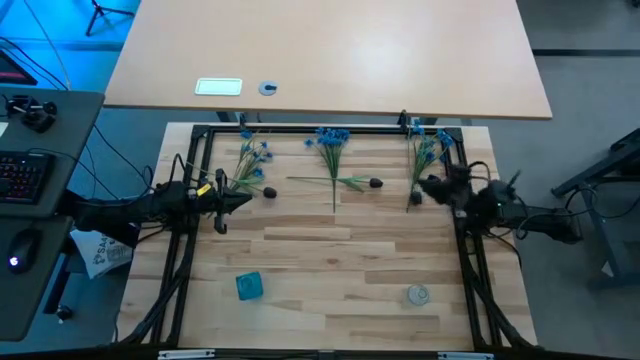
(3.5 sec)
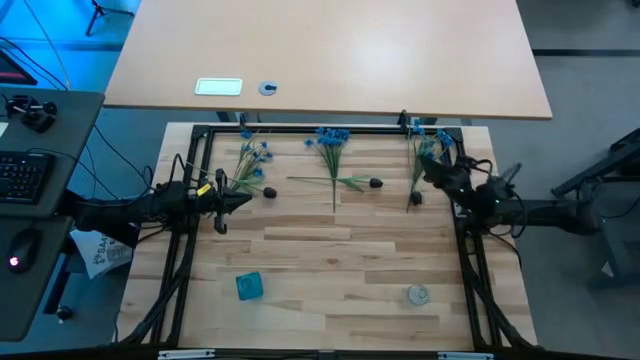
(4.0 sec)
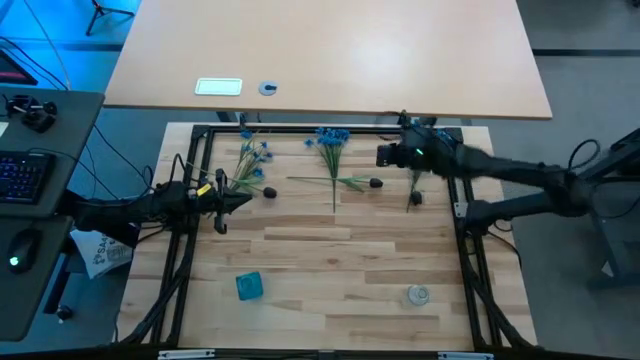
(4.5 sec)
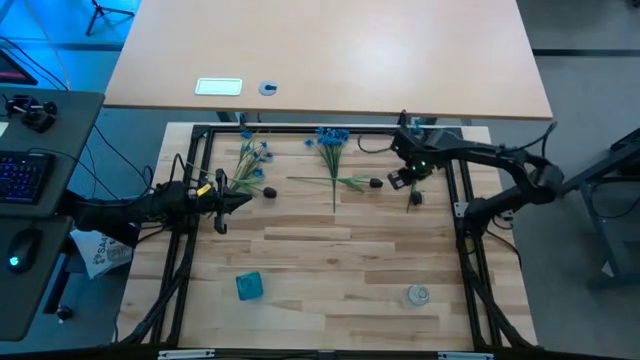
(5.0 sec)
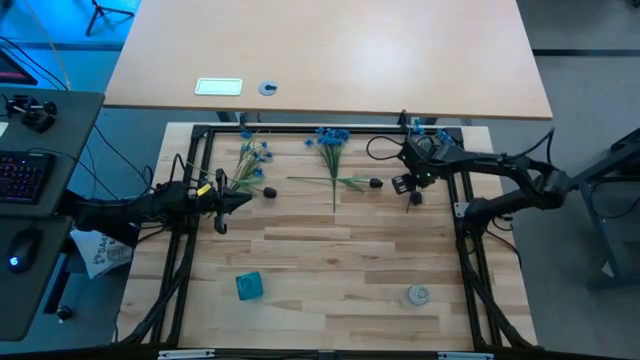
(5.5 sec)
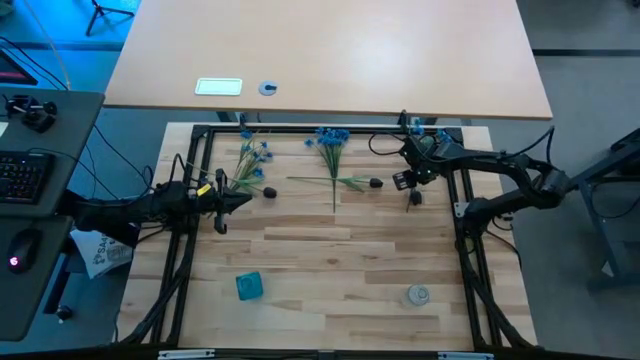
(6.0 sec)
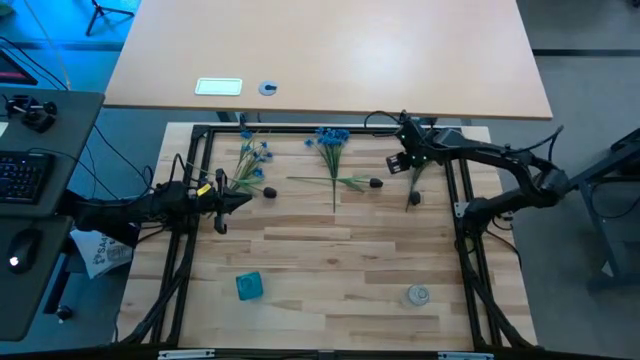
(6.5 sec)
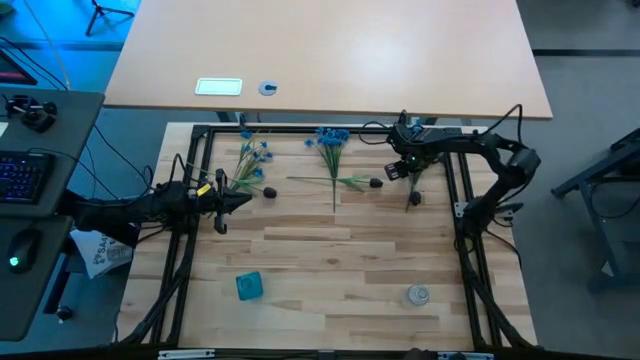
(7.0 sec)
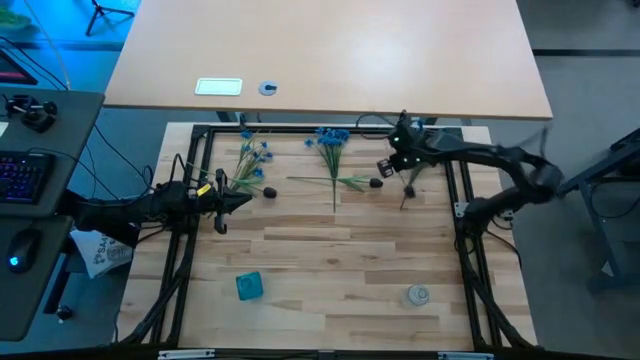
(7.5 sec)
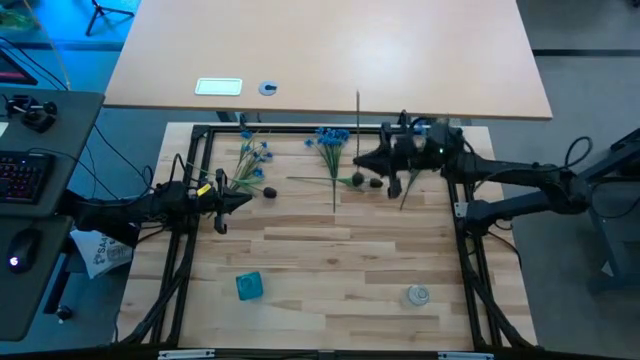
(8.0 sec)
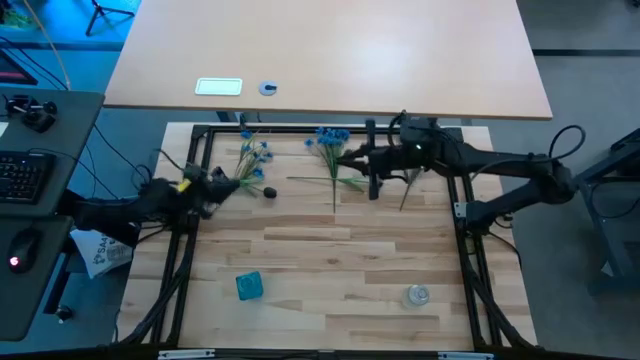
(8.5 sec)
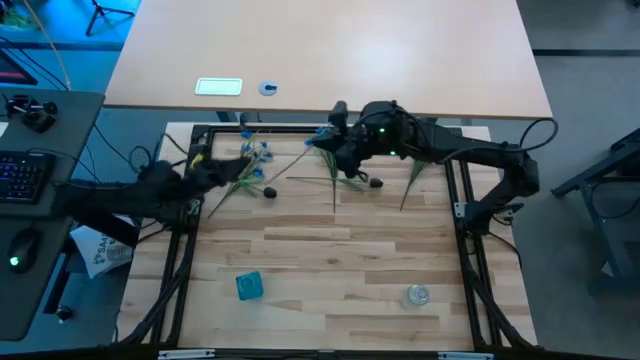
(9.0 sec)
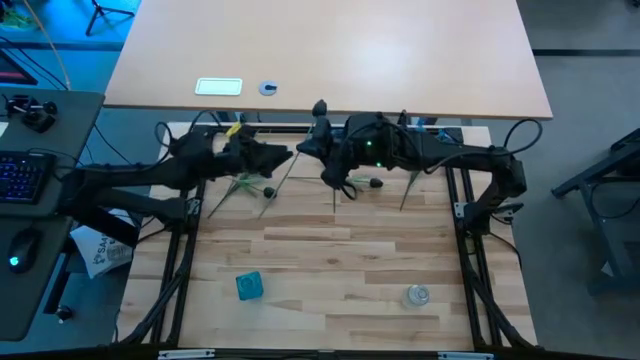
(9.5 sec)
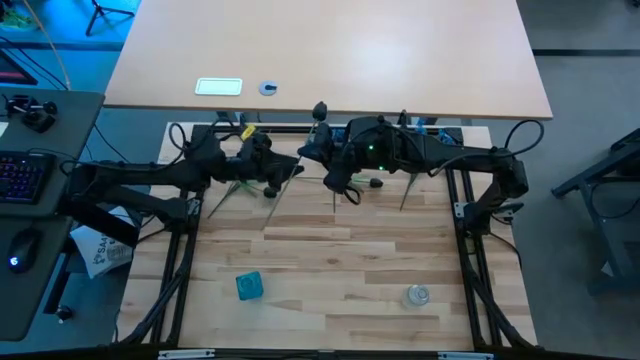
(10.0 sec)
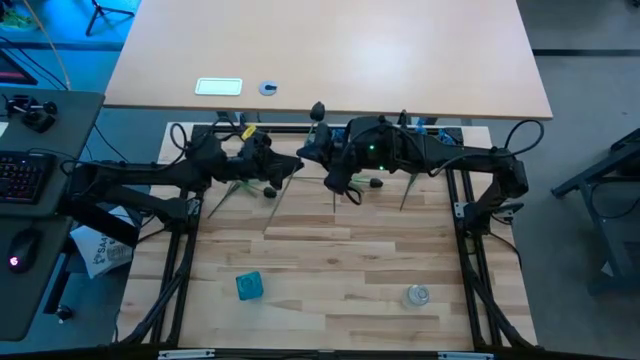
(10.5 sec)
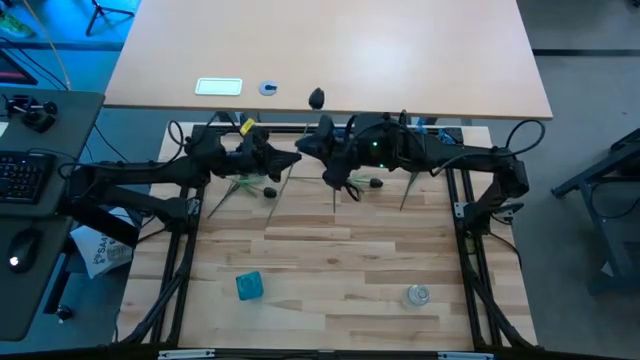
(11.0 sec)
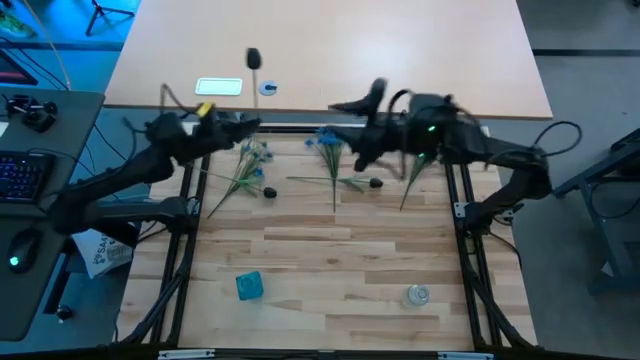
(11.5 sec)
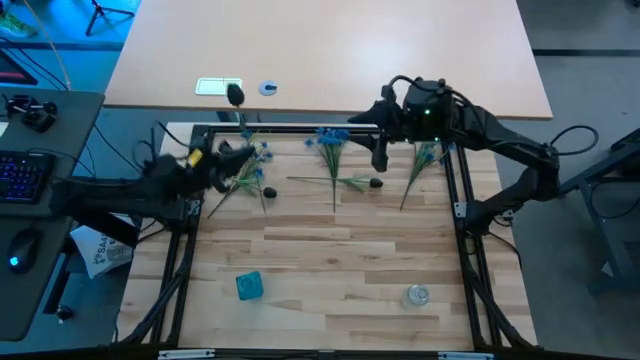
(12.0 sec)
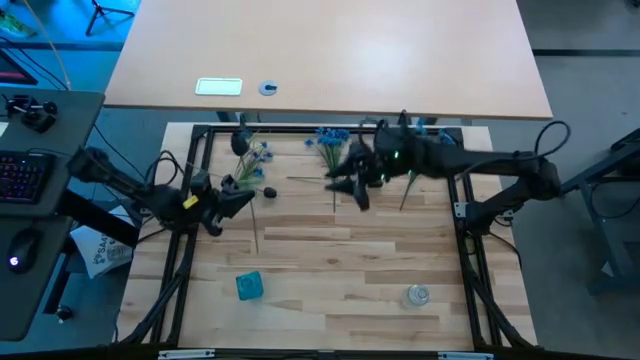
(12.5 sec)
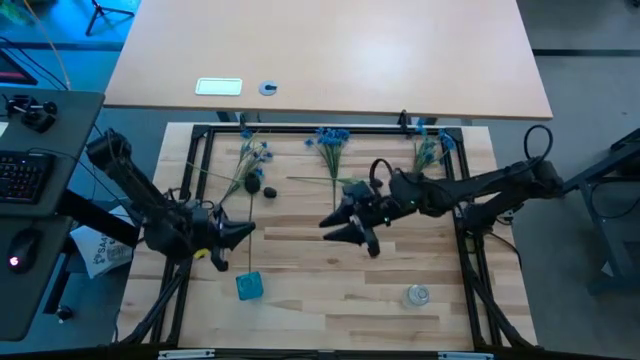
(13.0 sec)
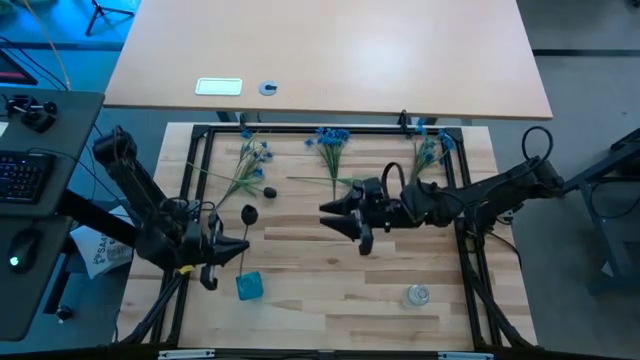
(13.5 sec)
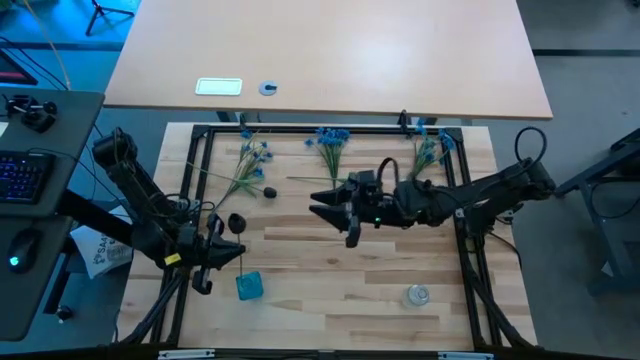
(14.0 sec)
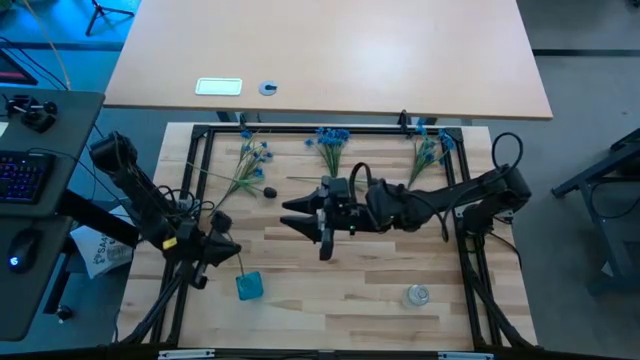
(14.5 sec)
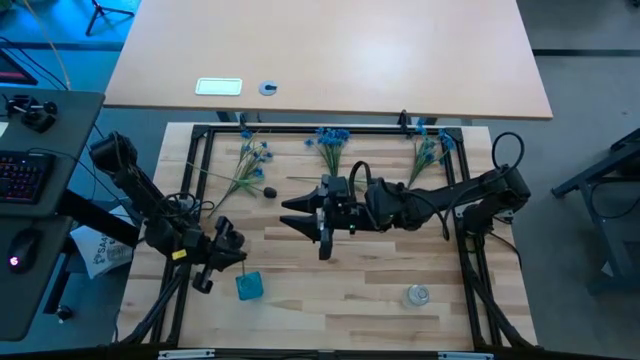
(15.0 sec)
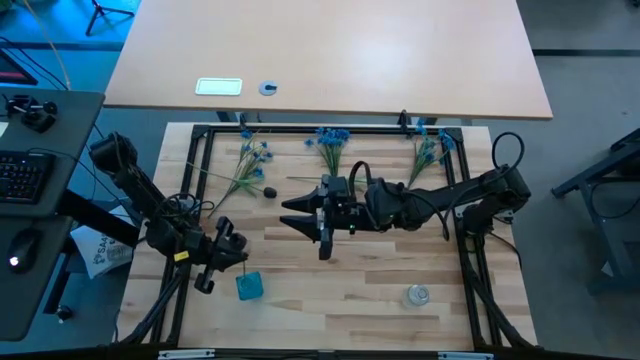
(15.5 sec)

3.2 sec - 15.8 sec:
Task: Sort flowers into vase by color
Put the right black flower into the blue vase

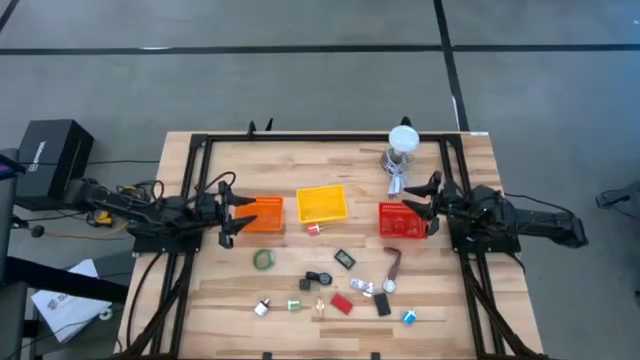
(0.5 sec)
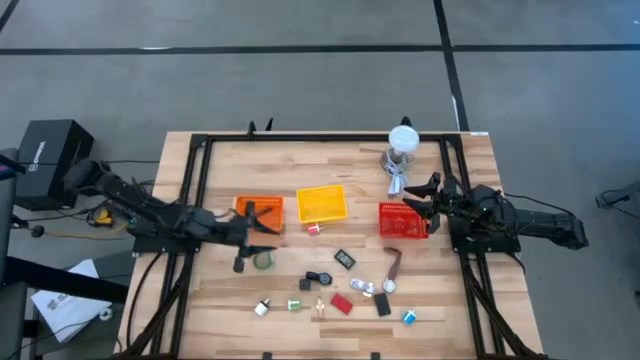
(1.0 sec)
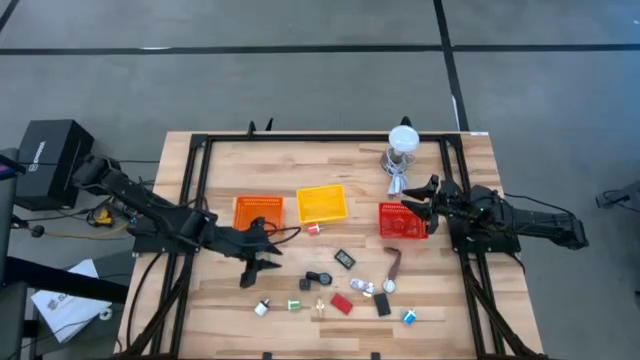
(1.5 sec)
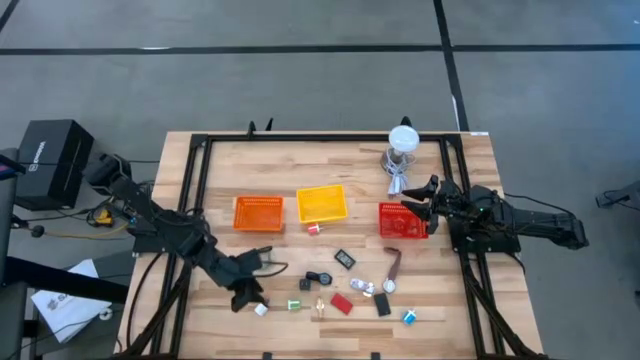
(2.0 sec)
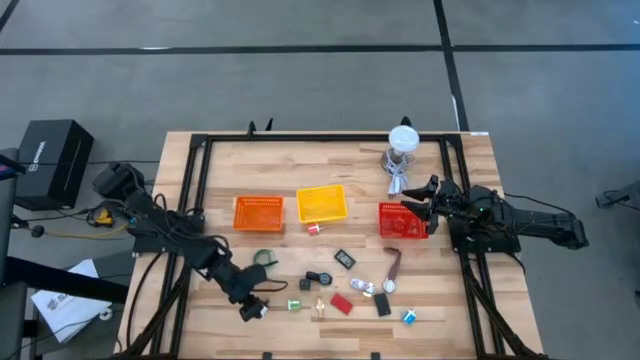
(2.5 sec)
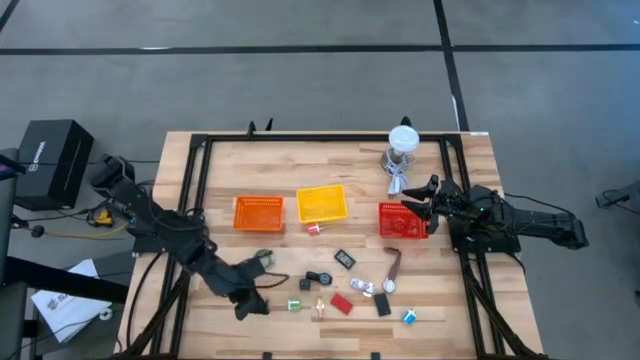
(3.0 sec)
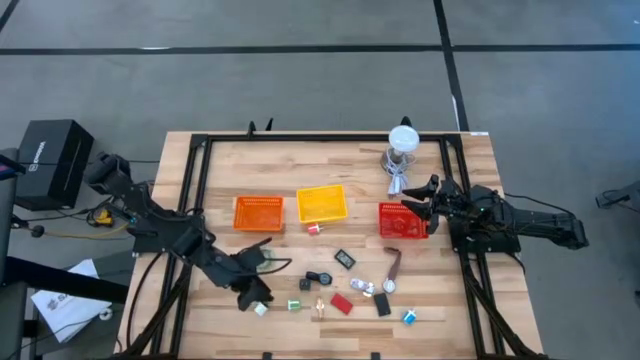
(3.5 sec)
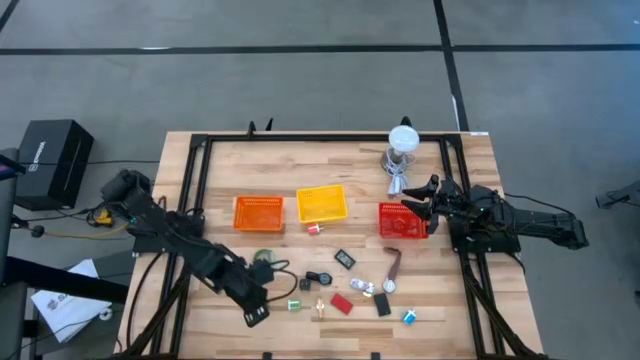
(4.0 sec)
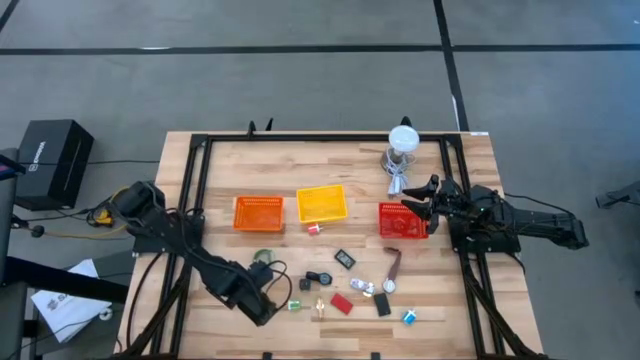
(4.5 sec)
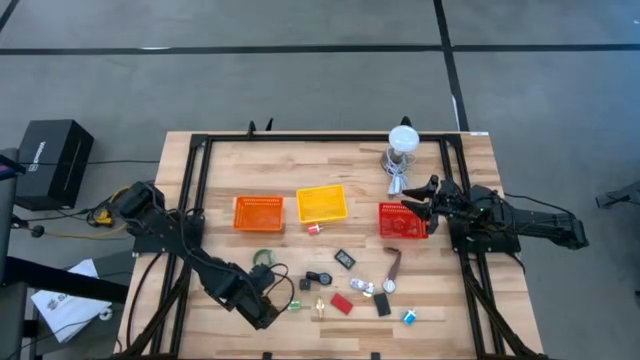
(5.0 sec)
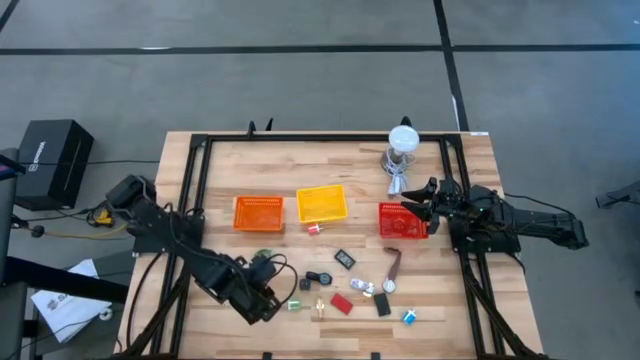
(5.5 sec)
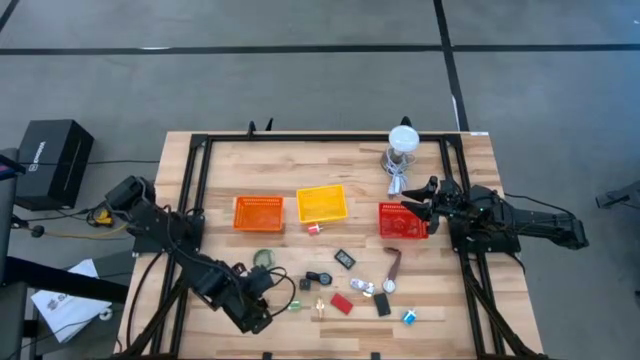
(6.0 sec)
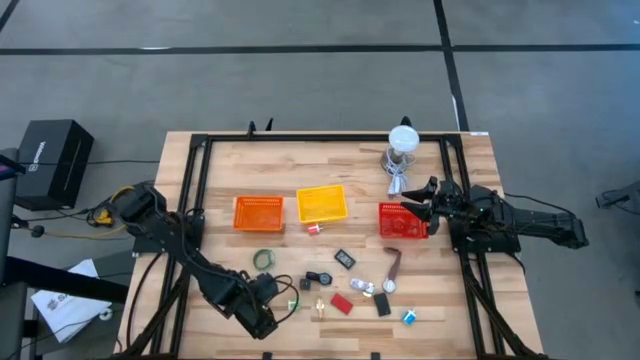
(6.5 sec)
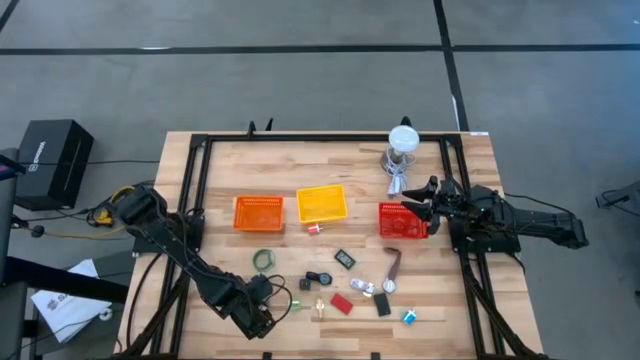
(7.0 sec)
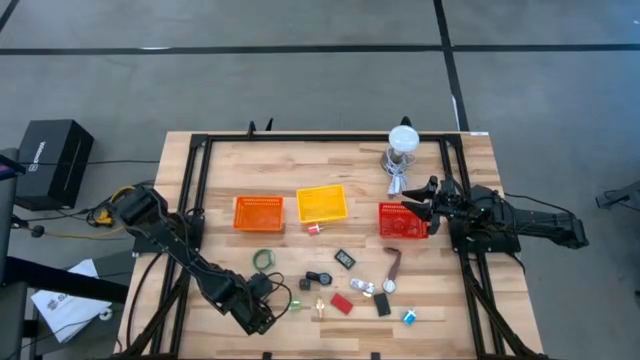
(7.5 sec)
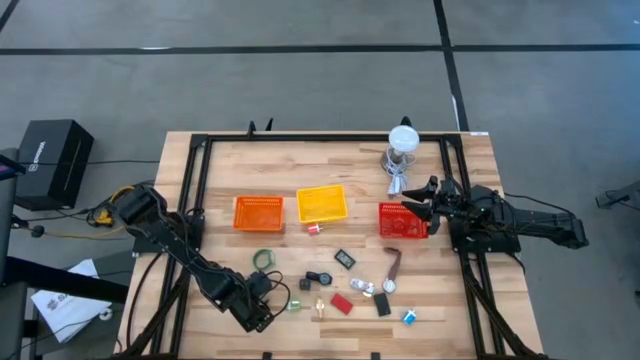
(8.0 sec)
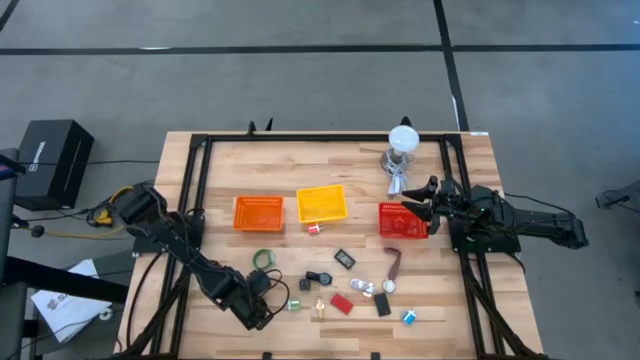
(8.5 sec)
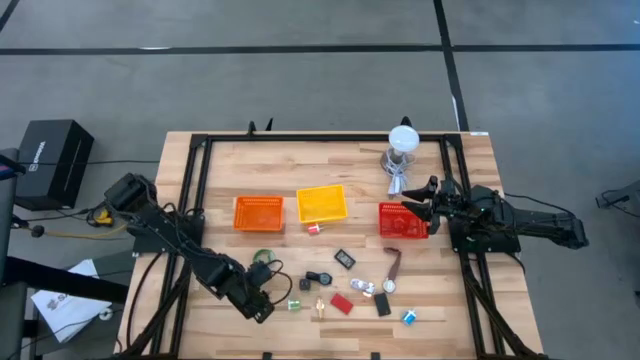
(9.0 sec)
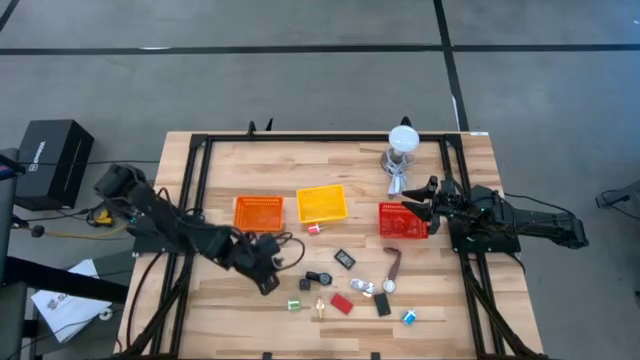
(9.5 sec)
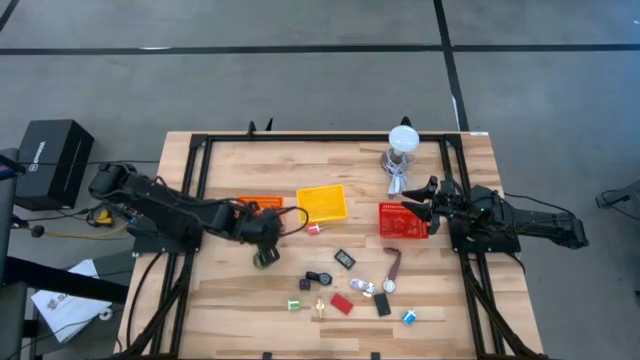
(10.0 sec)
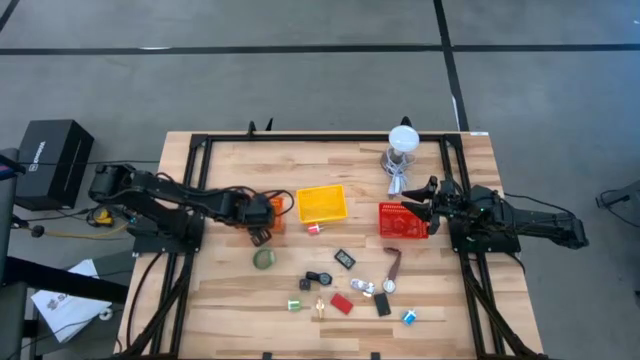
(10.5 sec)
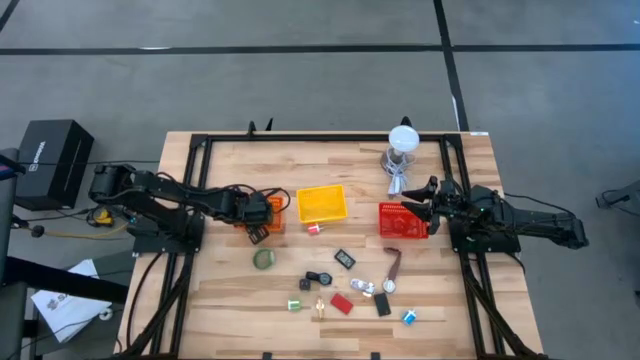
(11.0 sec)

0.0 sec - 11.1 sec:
Task: Pick & Place Office items
Put the white charging adapter into the orange bin
